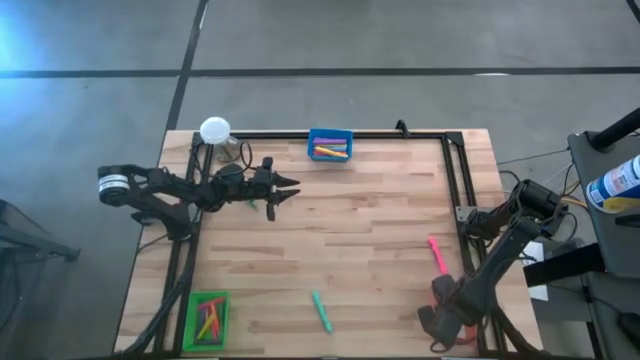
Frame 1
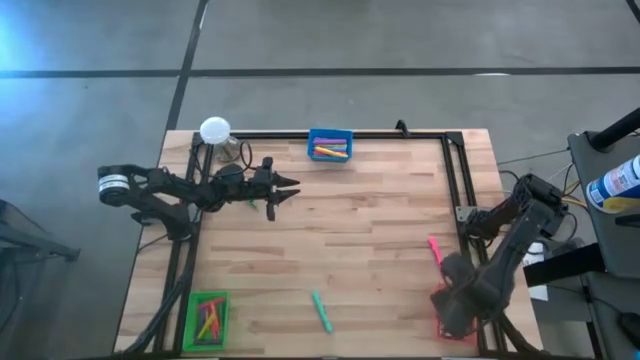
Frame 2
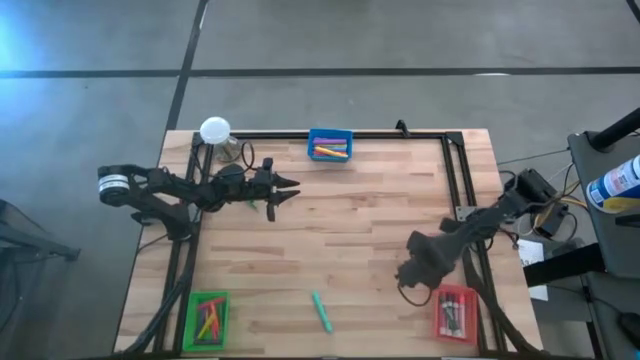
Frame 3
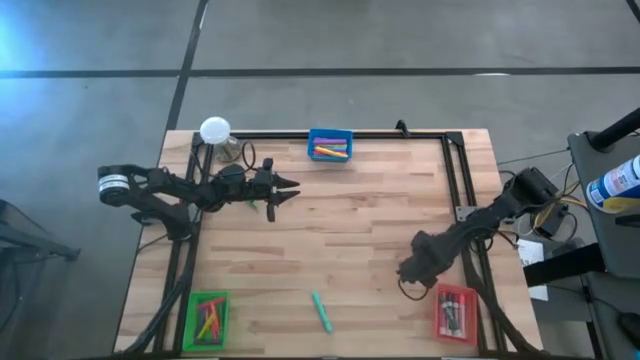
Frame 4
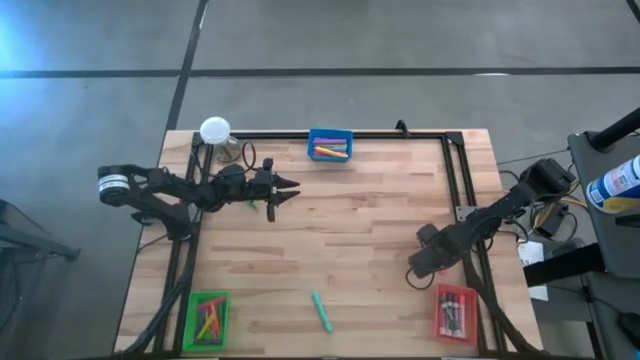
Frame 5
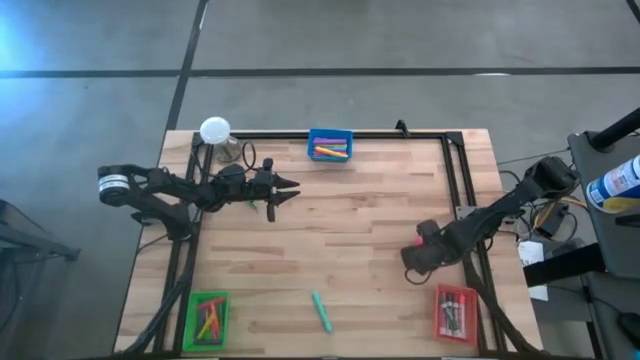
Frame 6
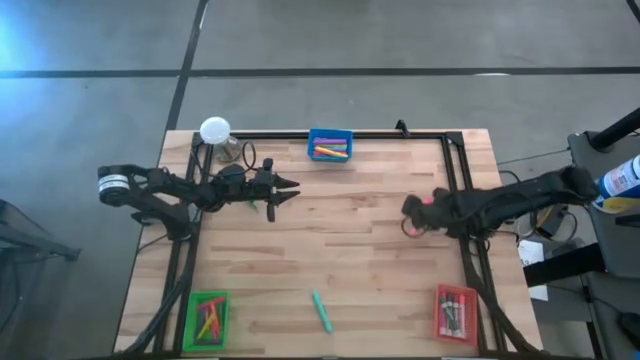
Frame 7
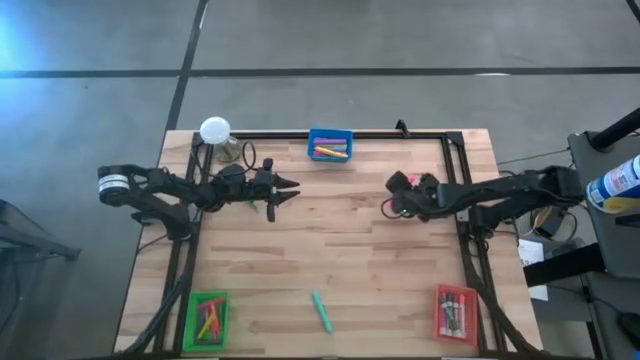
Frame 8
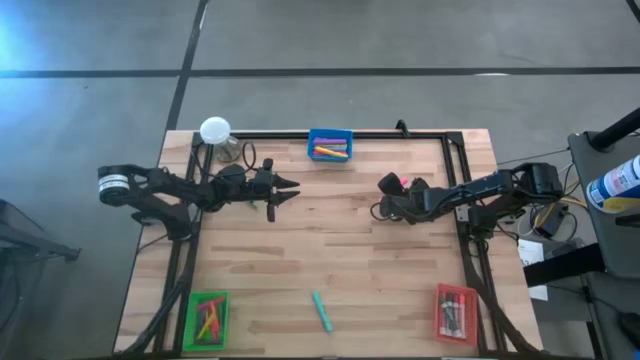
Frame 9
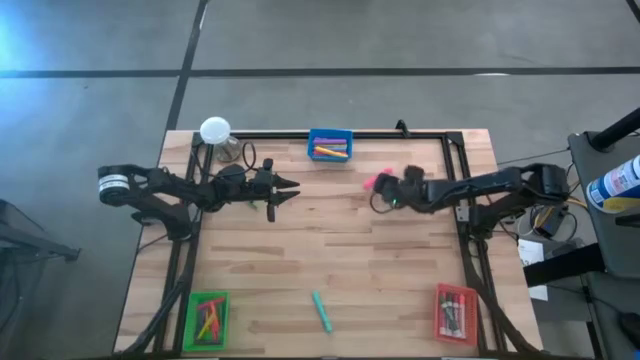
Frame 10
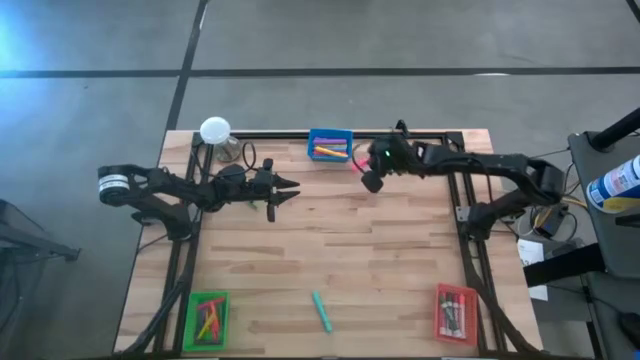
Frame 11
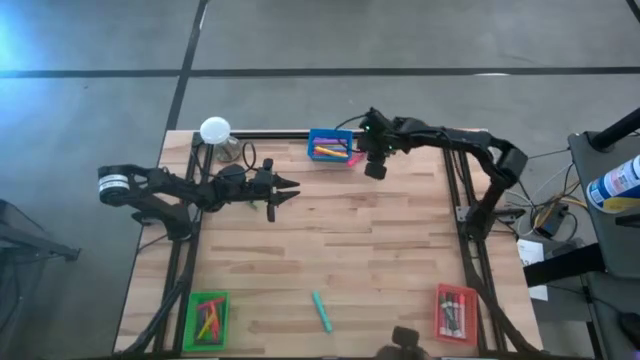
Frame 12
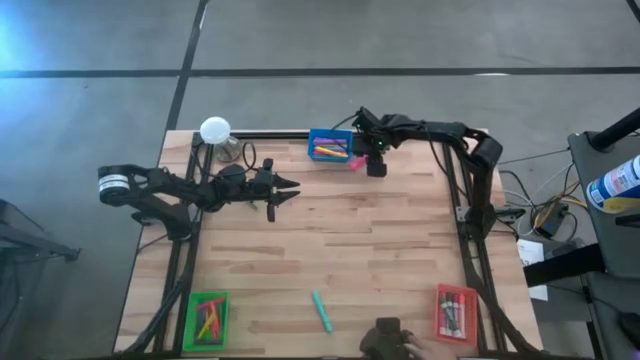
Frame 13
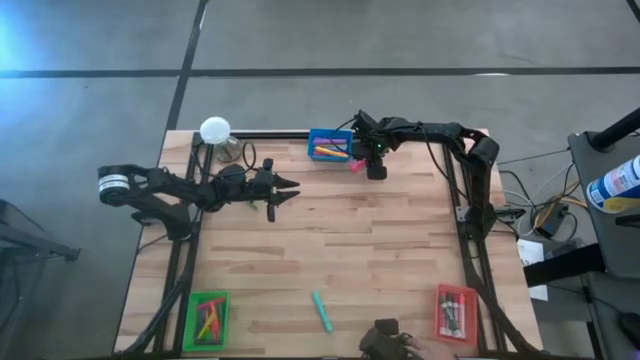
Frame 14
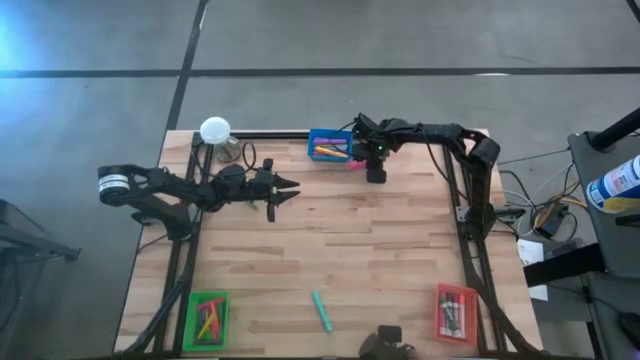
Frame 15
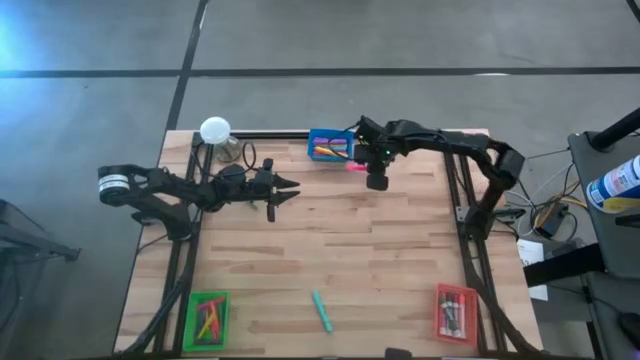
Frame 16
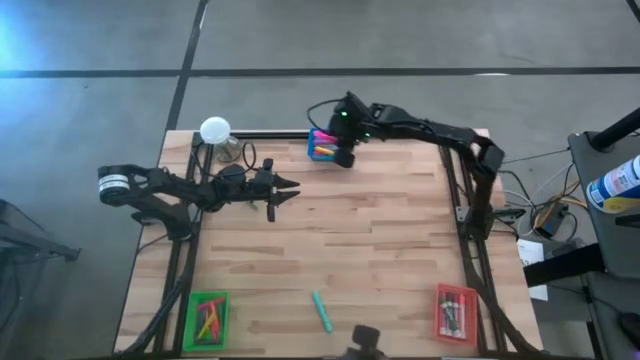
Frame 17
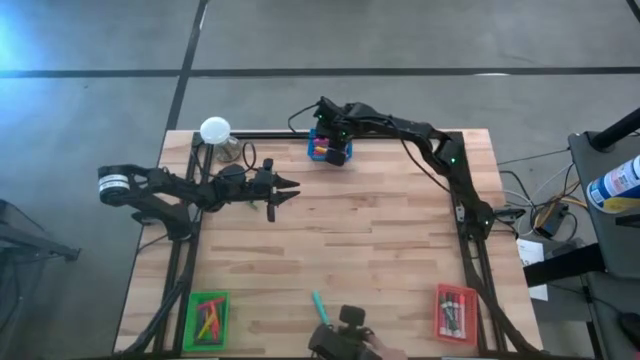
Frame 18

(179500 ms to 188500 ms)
Task: Pick & Place Markers
Put the pink highlighter into the blue bin

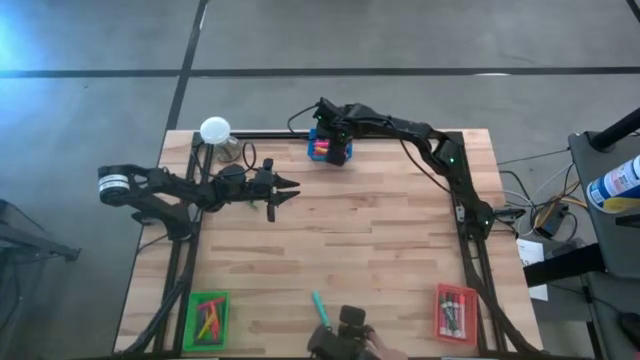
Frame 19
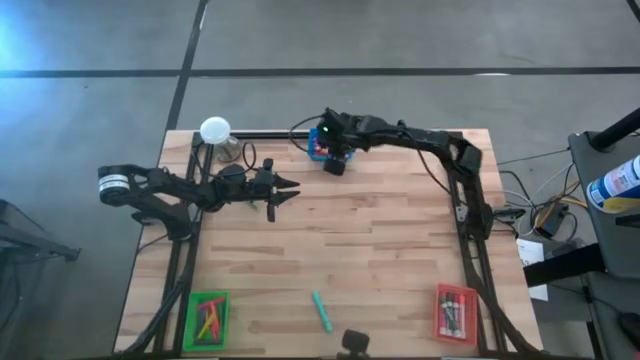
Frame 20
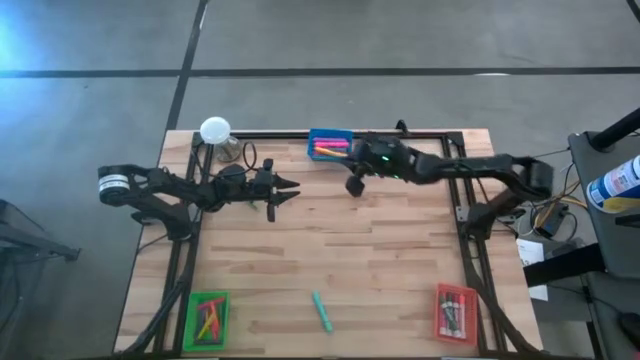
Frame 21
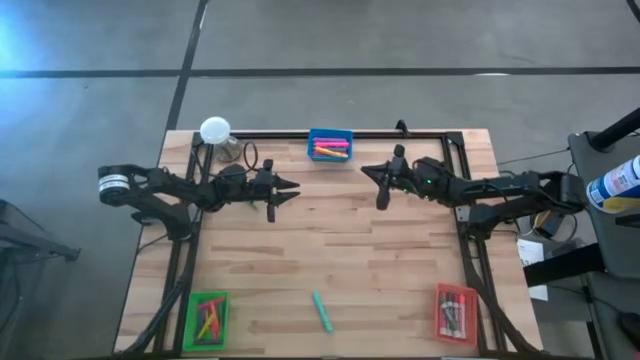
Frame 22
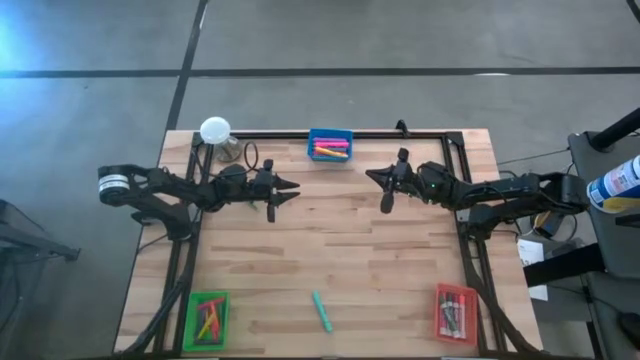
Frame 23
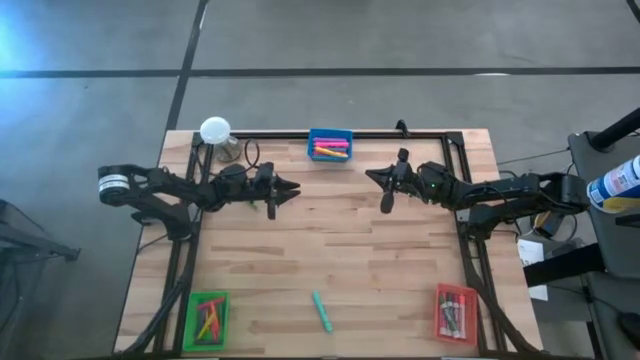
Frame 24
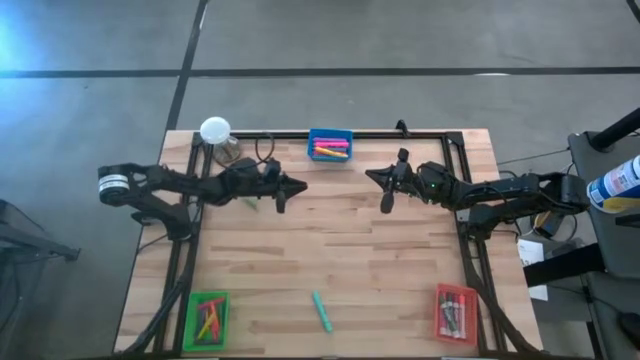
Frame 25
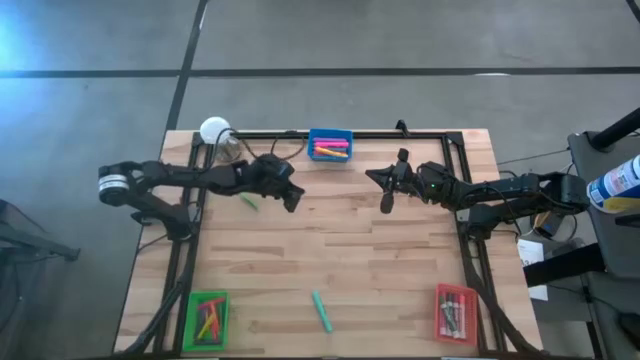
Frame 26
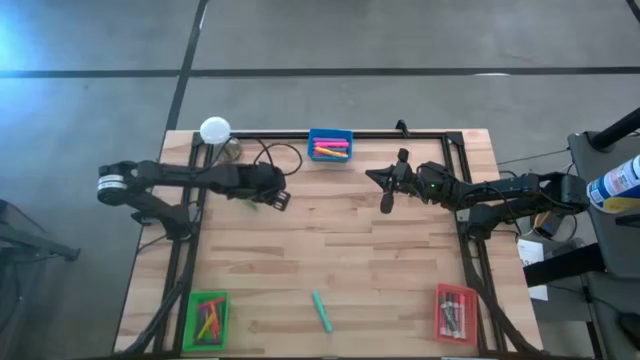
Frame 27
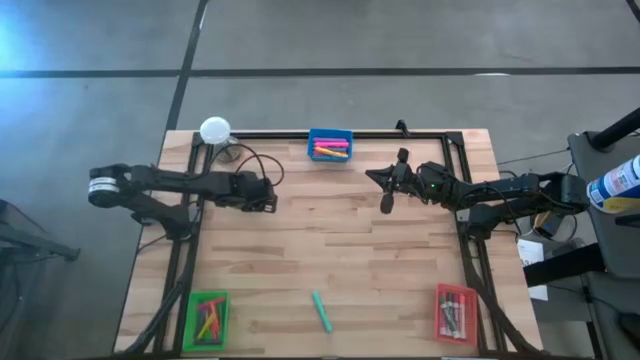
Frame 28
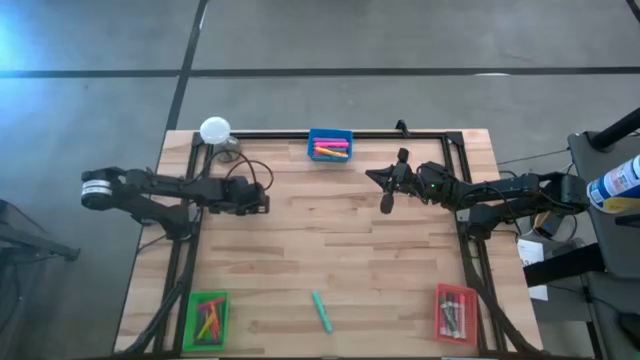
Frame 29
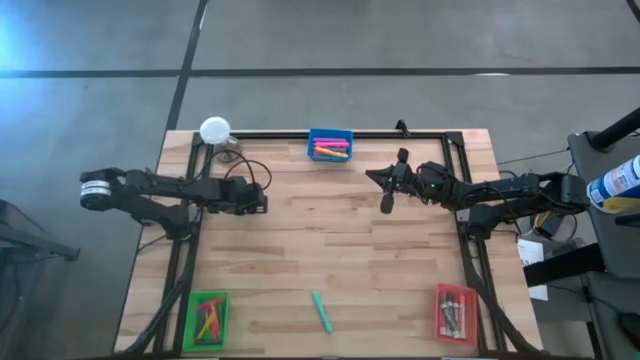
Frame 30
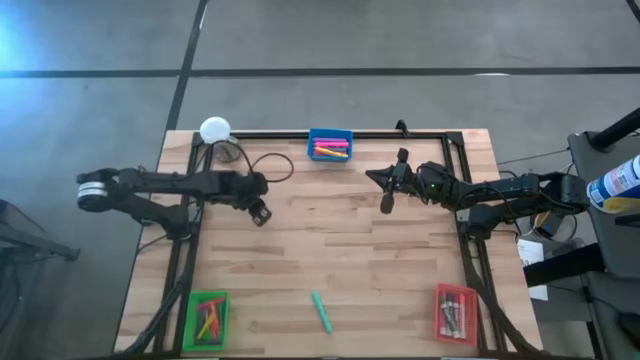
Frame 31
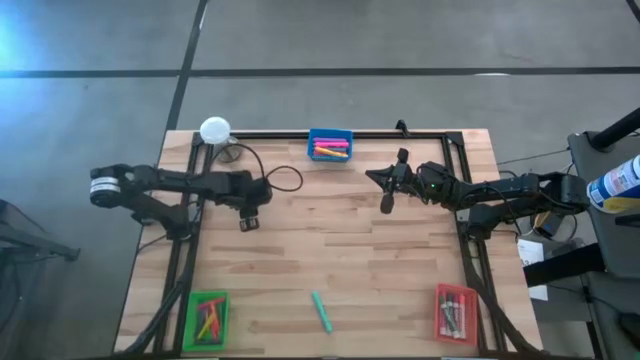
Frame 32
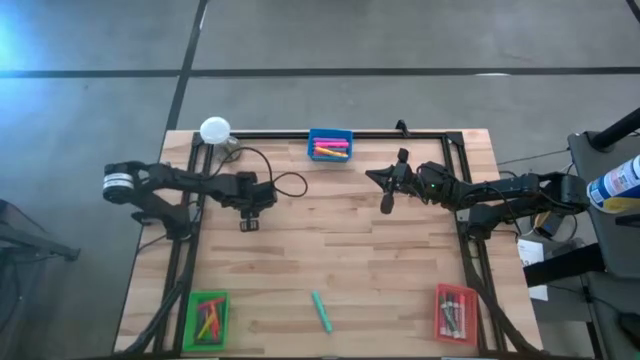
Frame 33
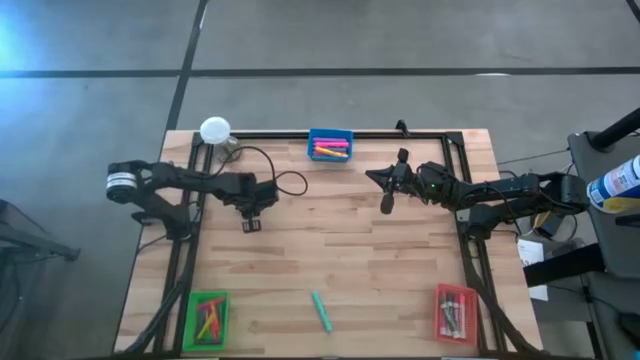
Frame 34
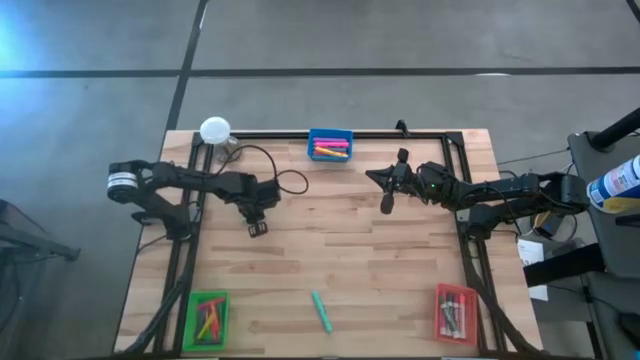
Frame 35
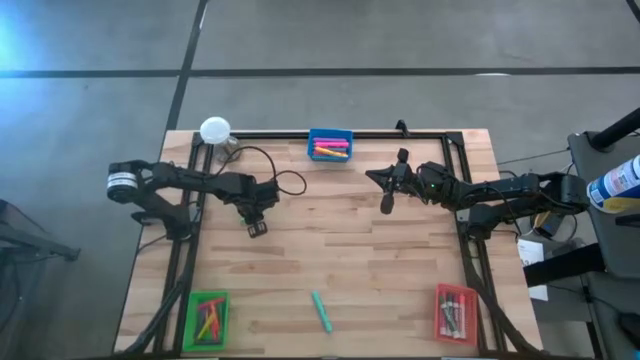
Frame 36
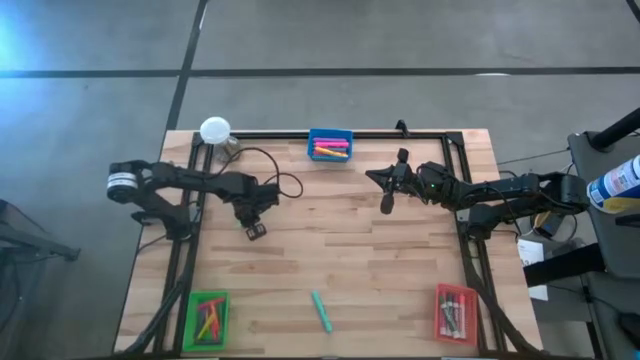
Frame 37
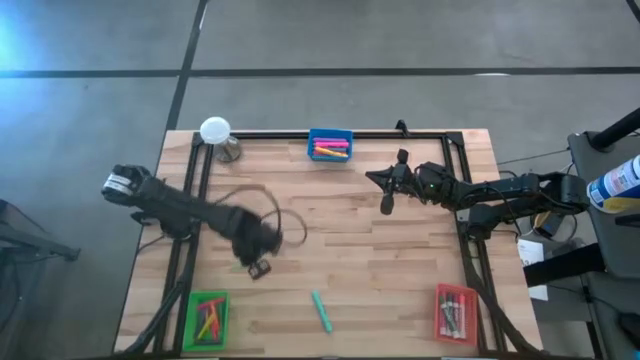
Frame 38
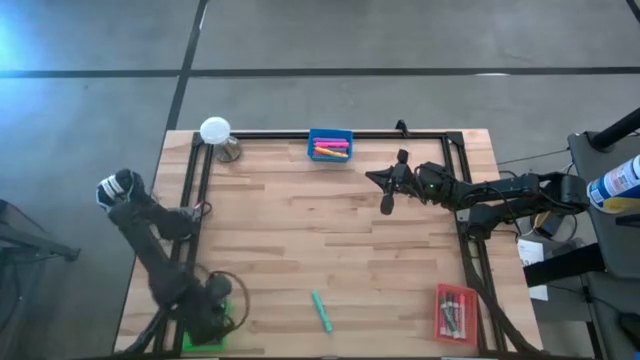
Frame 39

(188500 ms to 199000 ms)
Put the green pen into the green bin

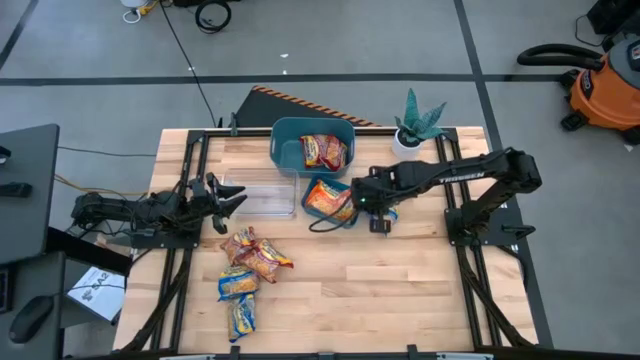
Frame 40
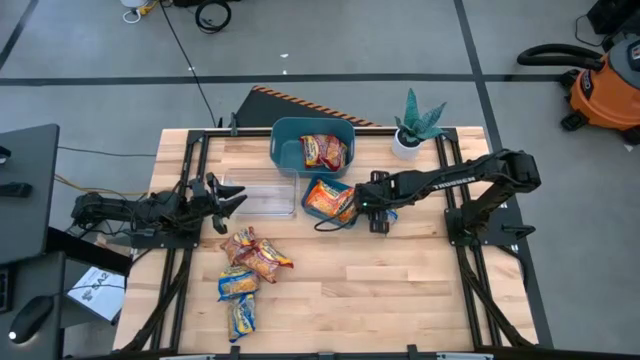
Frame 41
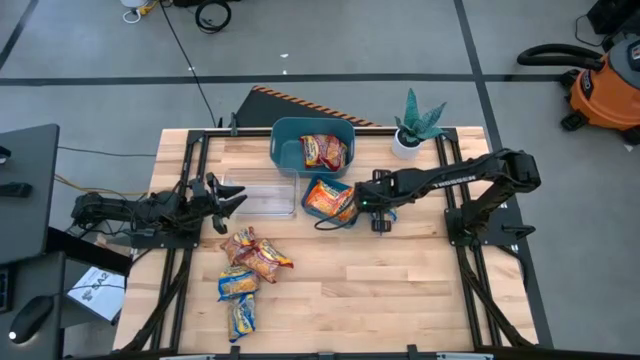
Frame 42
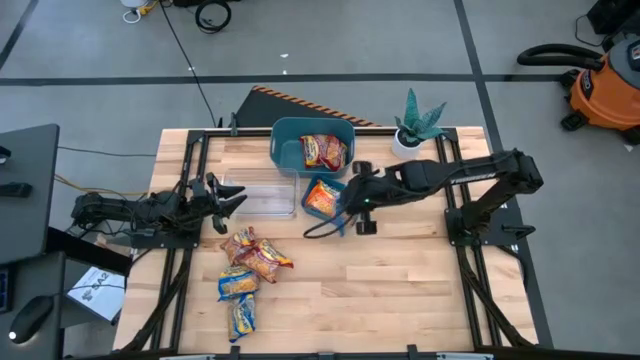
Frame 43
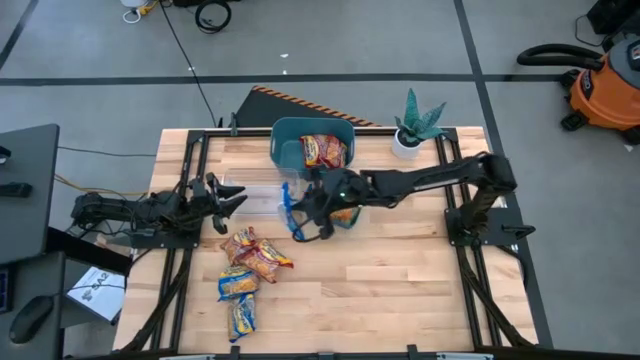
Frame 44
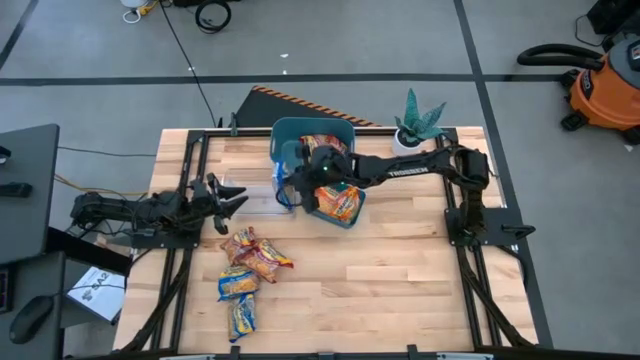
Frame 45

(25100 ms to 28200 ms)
Task: Sort Maruchan noodles
Put the blue noodle pack into the transparent bin
